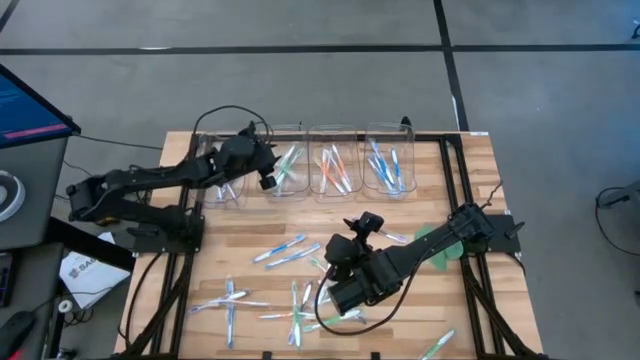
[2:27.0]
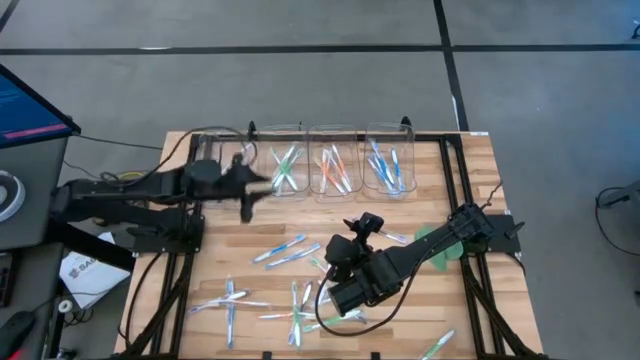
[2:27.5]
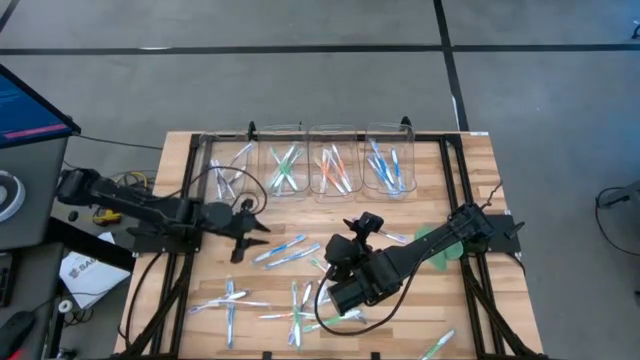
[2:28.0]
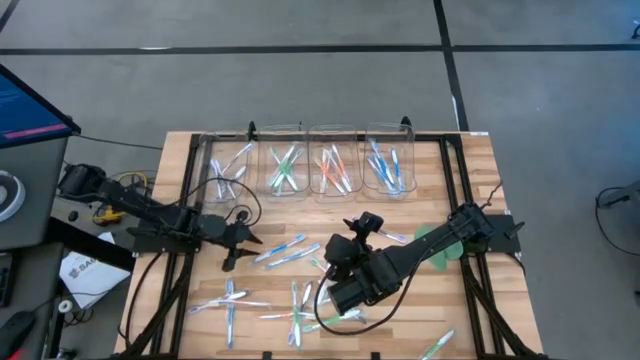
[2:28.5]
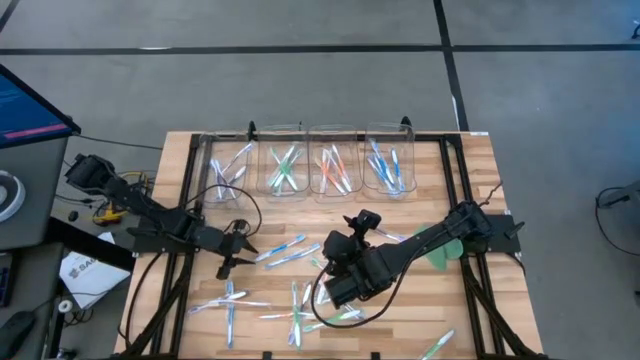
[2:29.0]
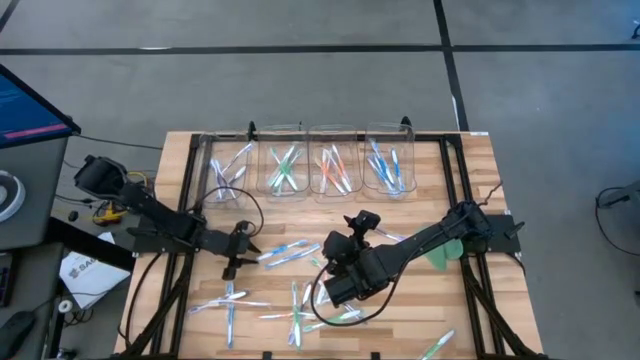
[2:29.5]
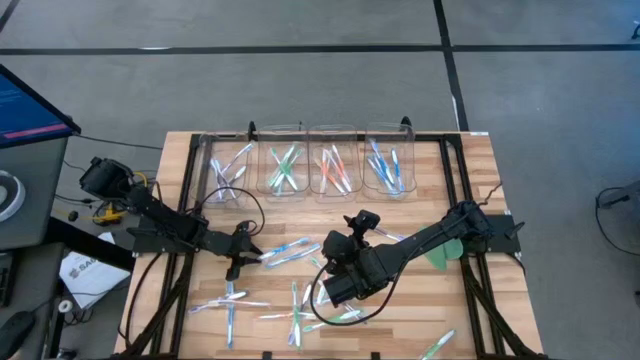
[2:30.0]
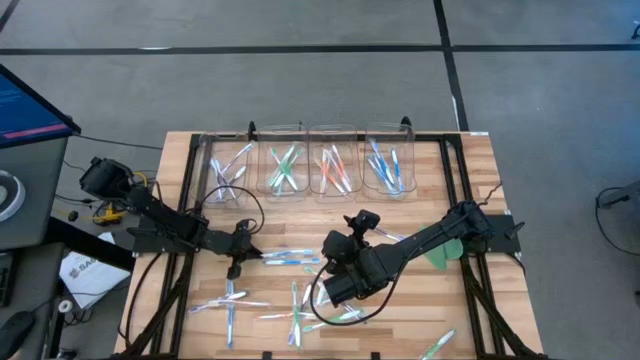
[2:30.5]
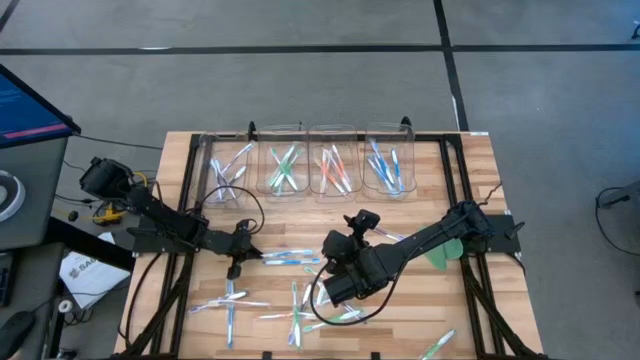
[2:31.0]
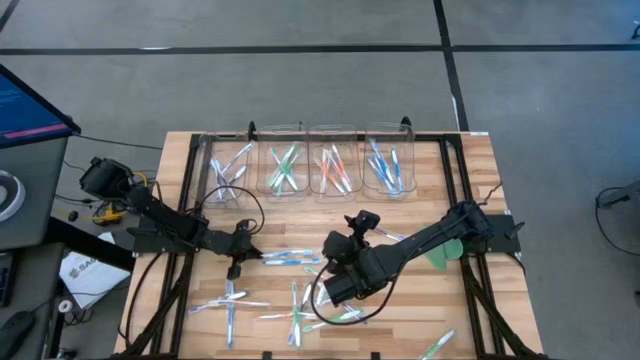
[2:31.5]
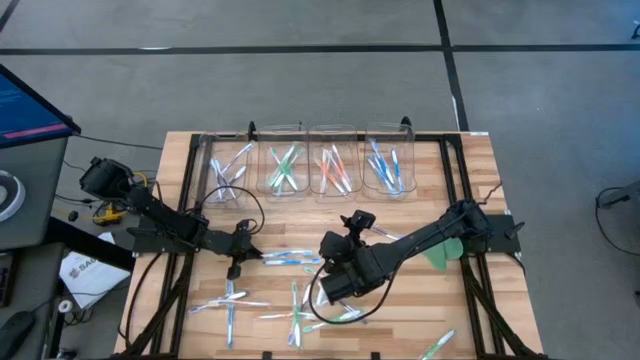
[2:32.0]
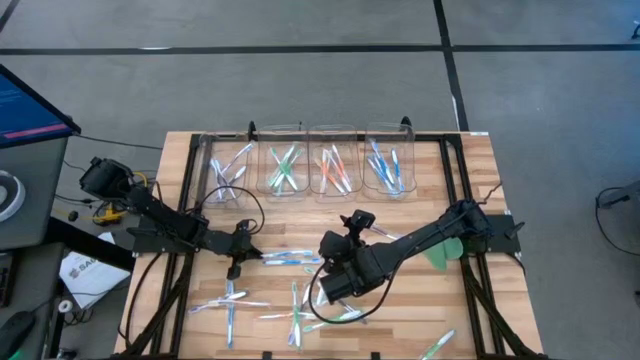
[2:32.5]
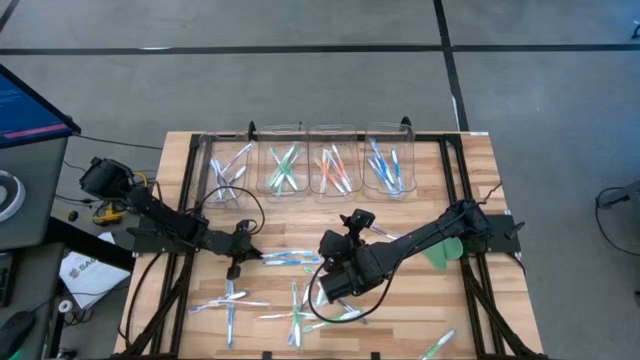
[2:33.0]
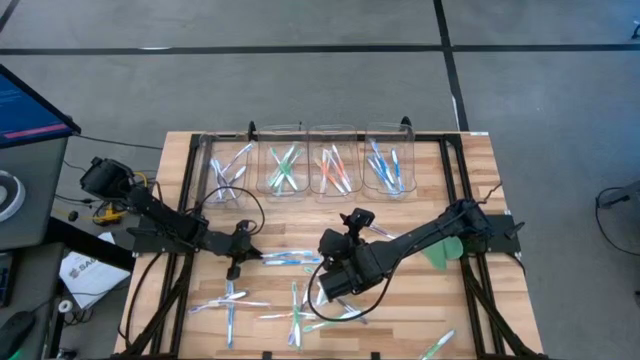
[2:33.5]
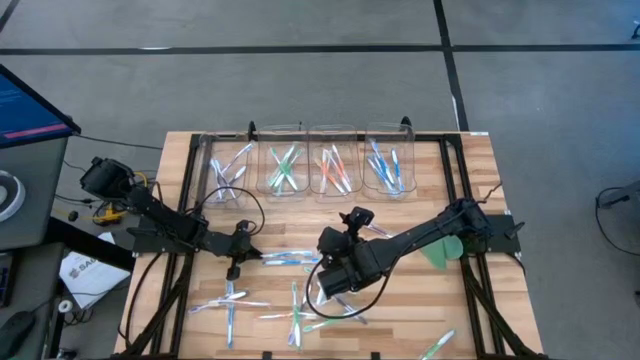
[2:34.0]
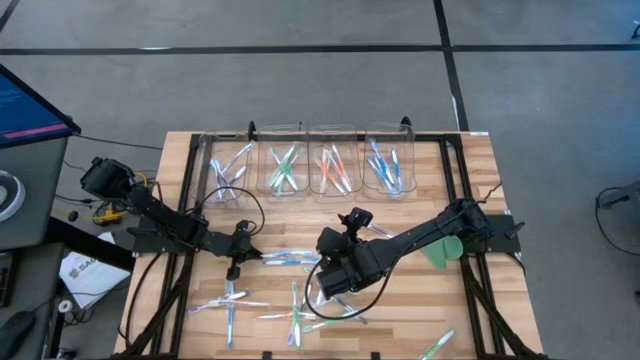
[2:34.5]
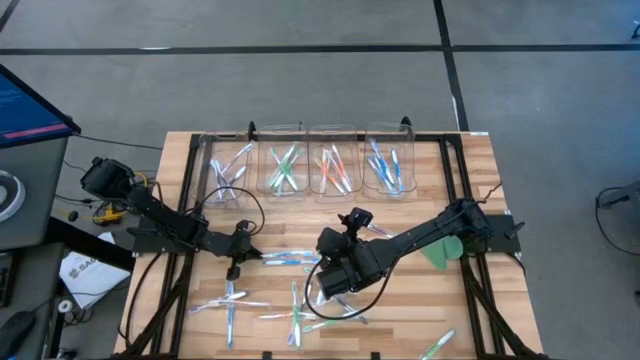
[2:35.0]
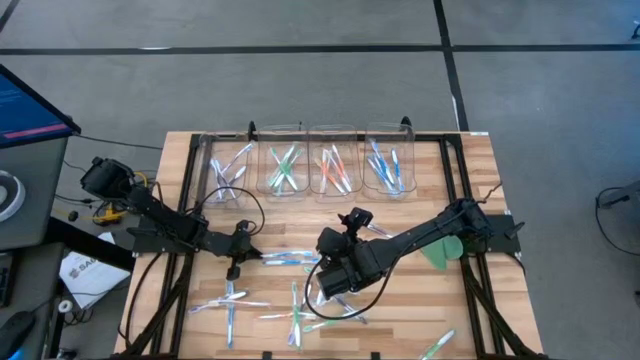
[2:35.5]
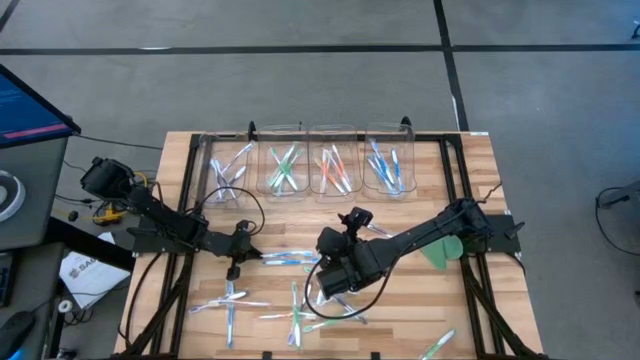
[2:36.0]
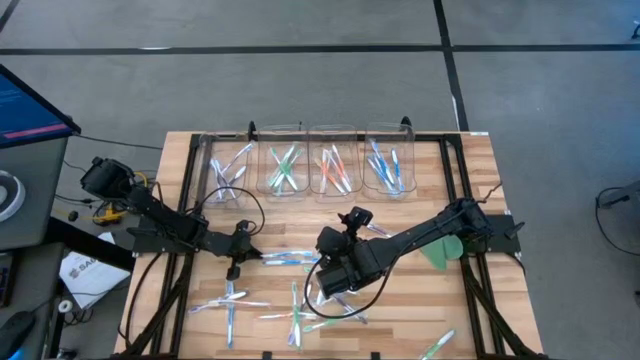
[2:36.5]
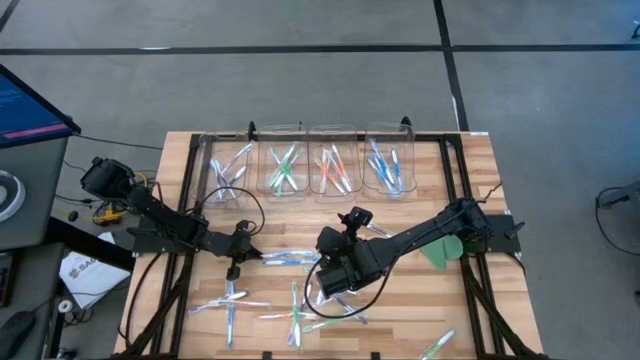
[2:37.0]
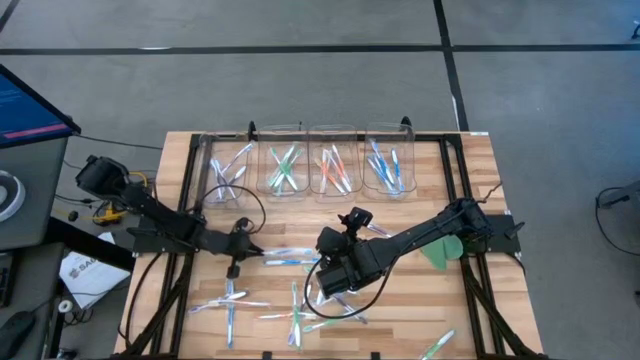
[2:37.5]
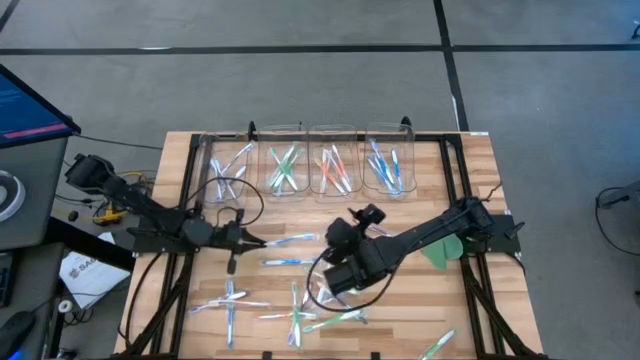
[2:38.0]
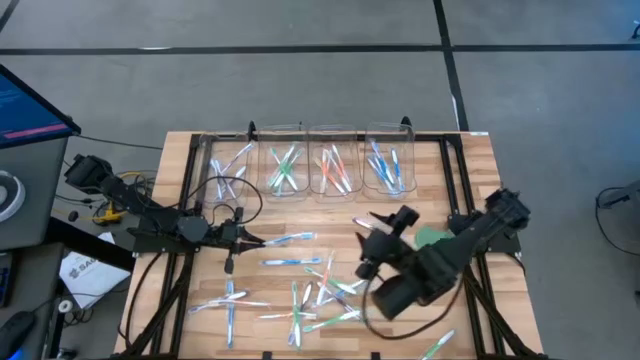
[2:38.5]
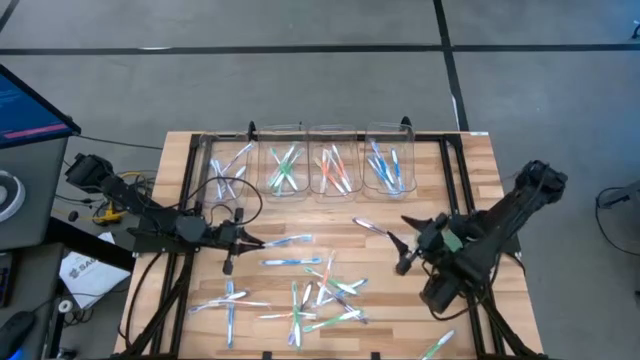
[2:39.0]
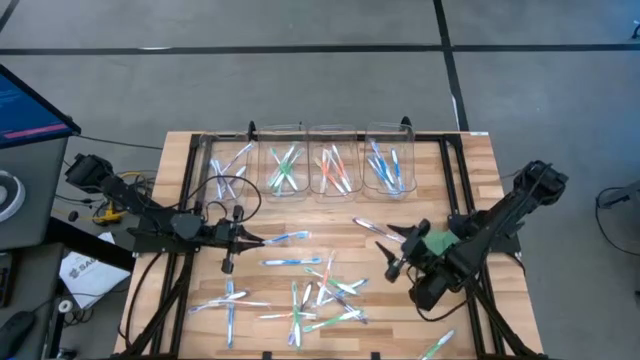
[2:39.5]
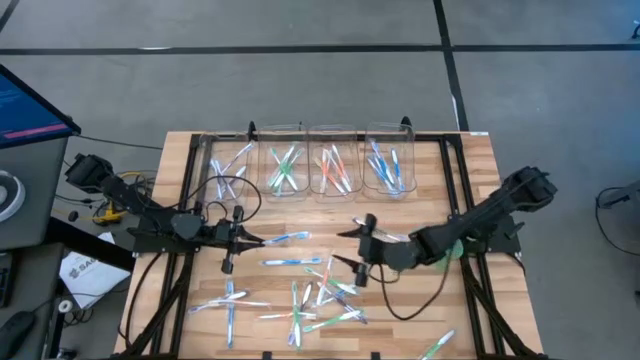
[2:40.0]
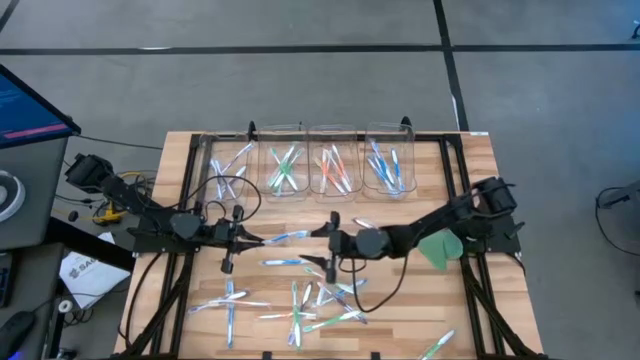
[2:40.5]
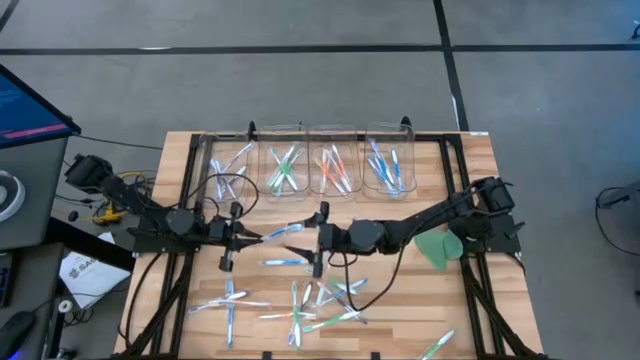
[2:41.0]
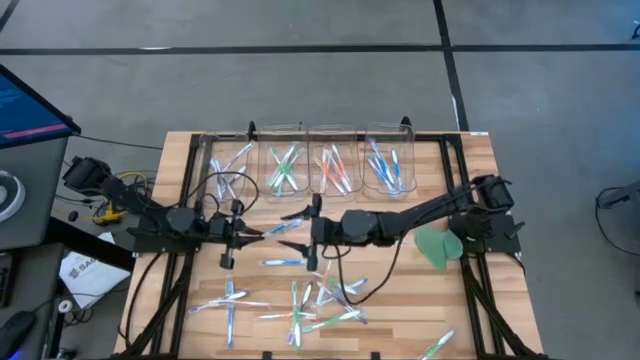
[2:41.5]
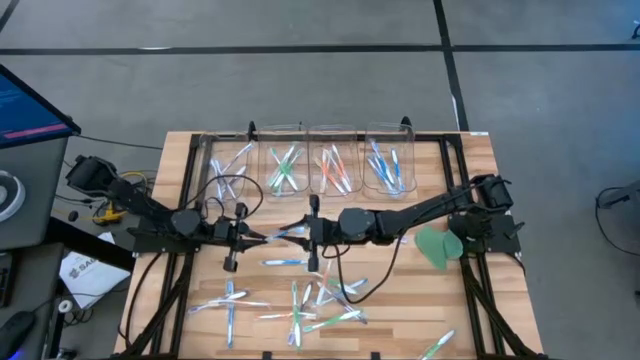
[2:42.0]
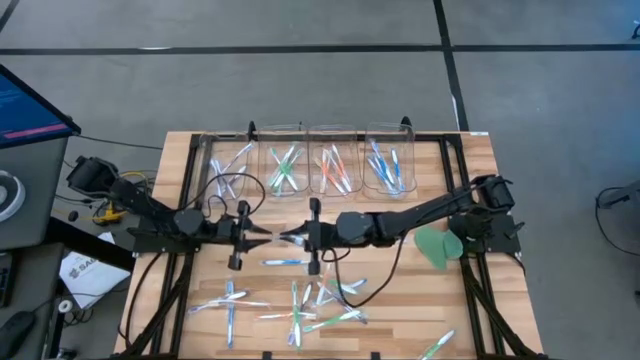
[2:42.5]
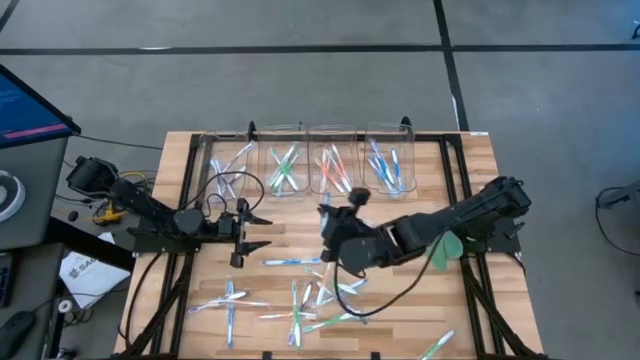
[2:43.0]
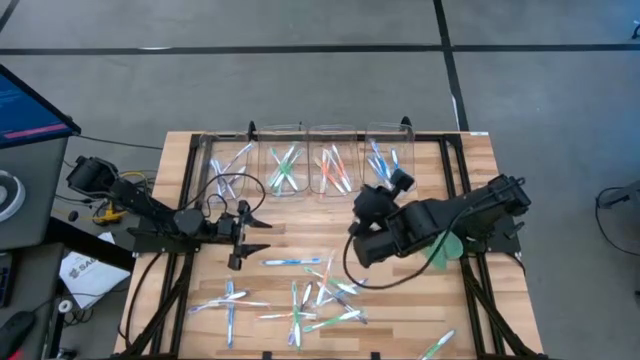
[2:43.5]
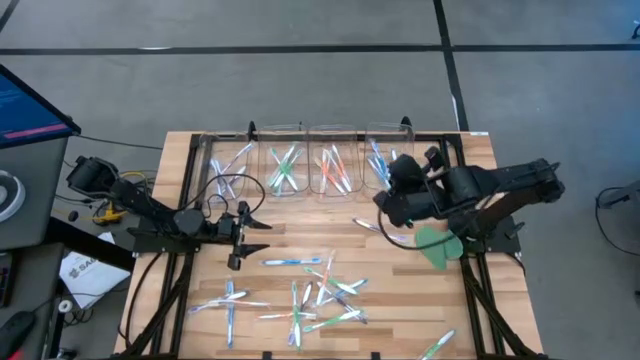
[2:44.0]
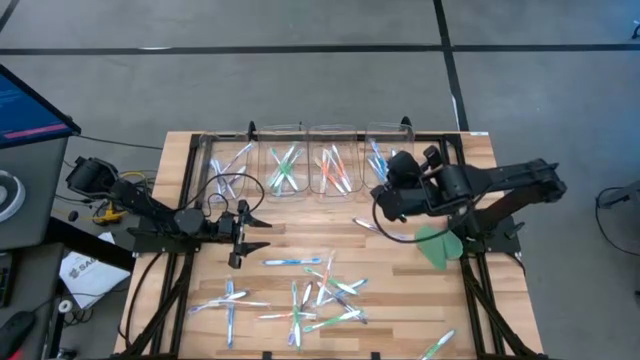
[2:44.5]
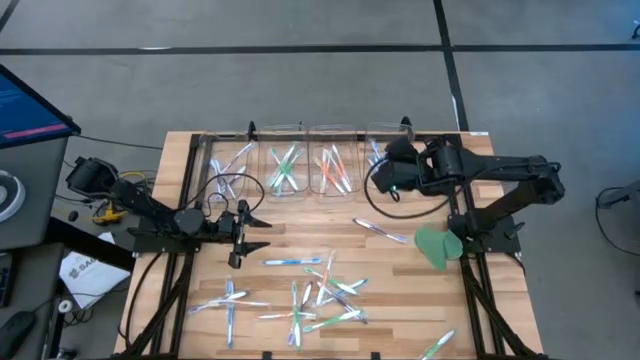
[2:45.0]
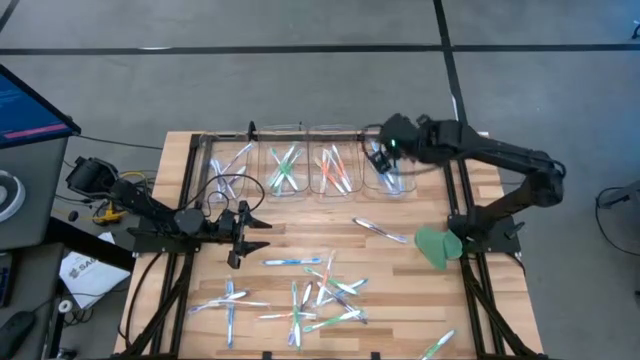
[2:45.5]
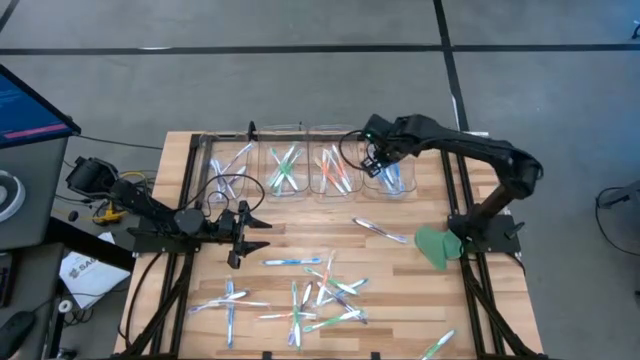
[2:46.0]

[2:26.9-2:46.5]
Task: Pick & Place Toothbrushes
Put the blue toothbrush into the right transparent bin

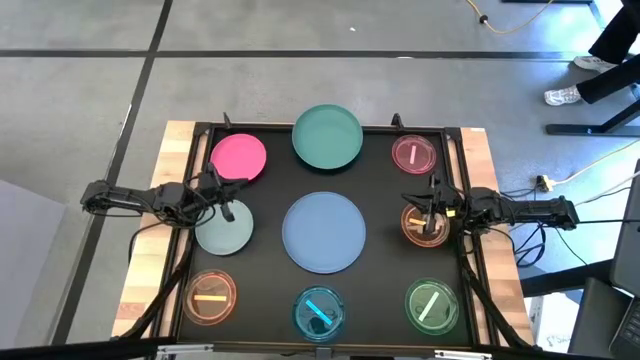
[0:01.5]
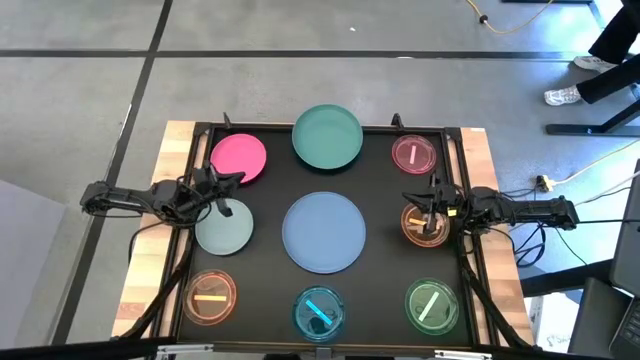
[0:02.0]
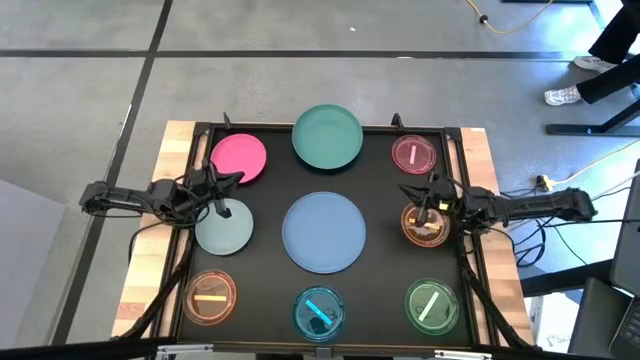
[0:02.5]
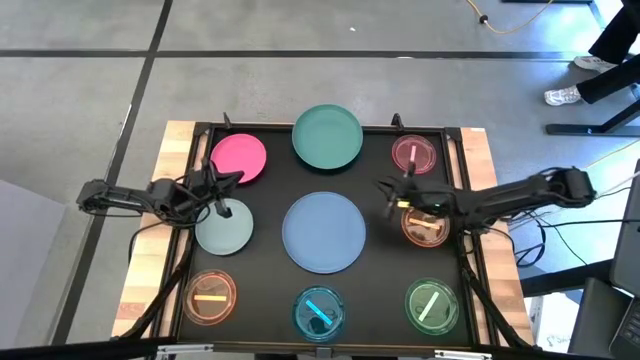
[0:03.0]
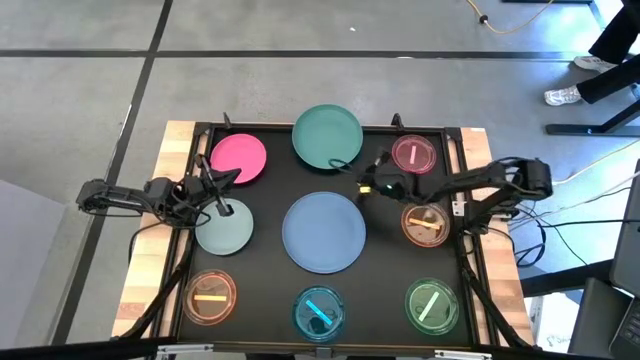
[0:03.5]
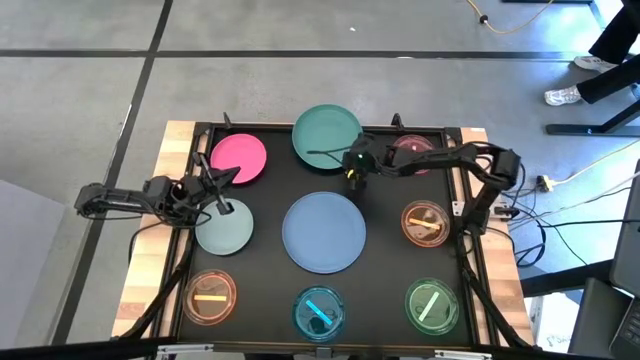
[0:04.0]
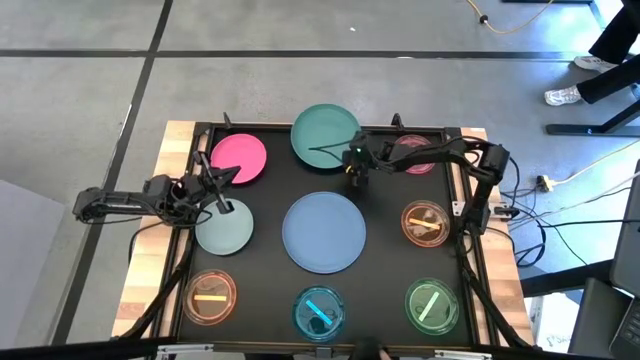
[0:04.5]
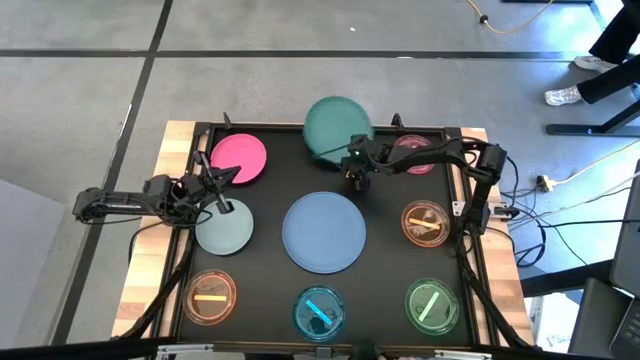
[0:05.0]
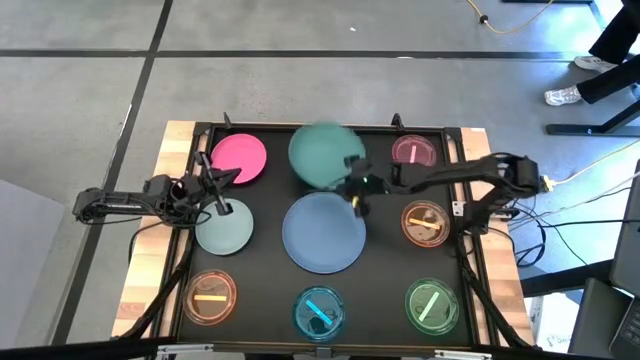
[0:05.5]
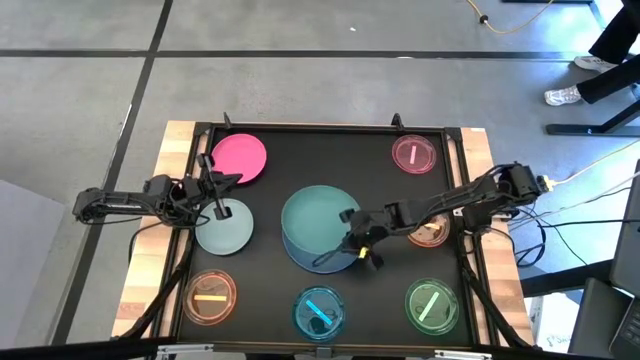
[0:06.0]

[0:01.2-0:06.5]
Task: Stack plastic plates
Stack the green plate on top of the blue plate
